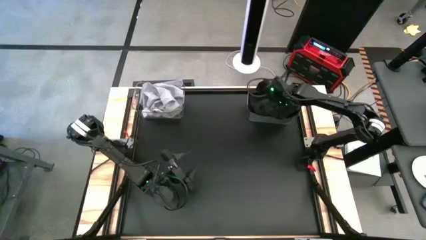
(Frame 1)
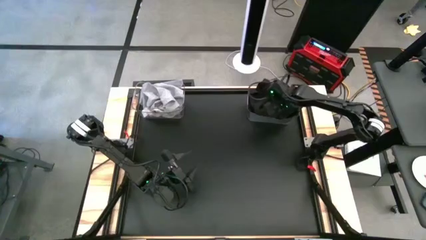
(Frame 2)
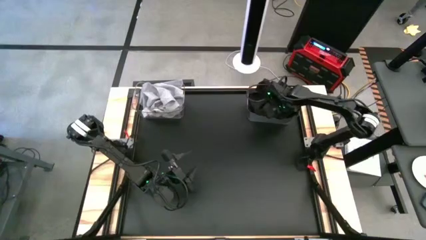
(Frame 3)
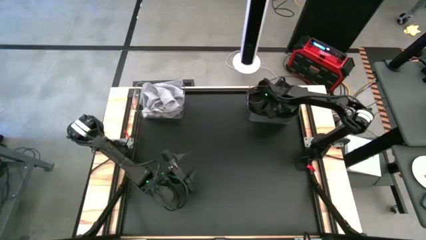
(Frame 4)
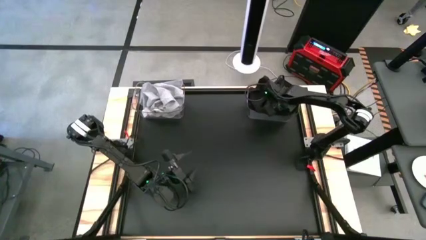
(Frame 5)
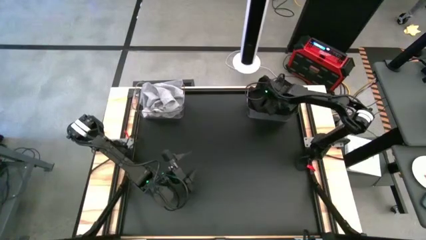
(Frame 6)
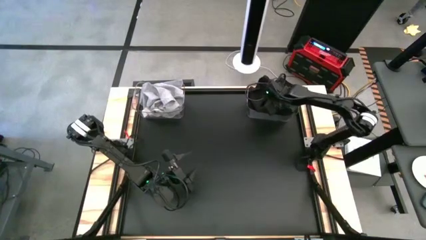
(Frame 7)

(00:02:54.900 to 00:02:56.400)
Task: Sort towels by color in basket
Adjust the black towel in the right transparent bin

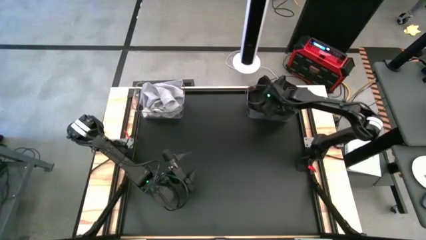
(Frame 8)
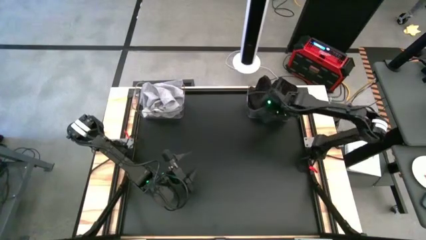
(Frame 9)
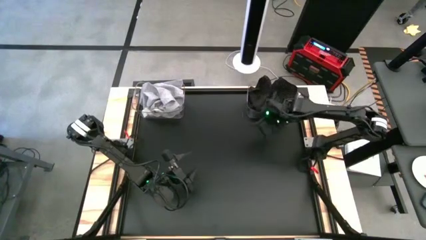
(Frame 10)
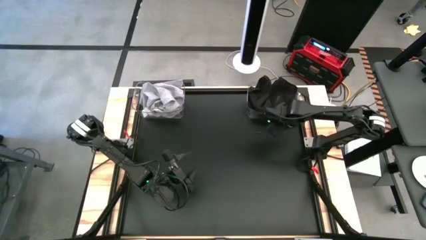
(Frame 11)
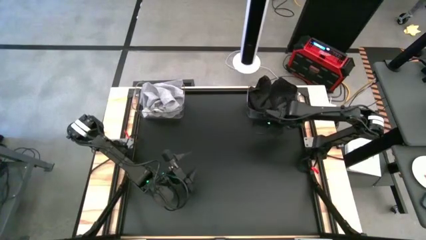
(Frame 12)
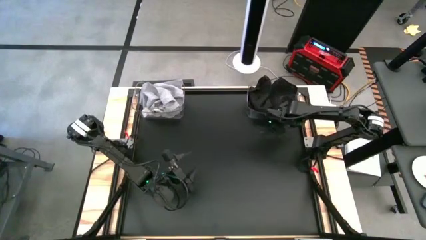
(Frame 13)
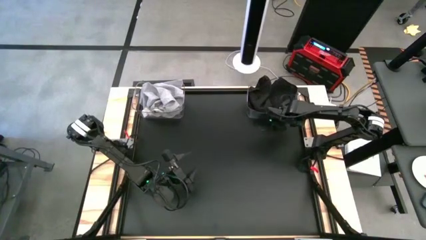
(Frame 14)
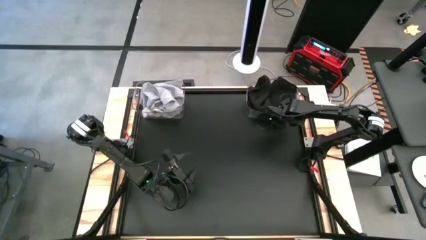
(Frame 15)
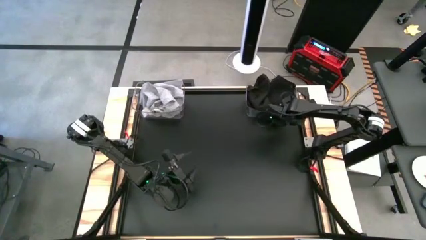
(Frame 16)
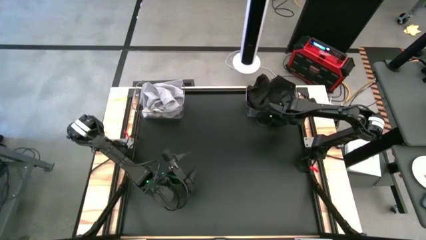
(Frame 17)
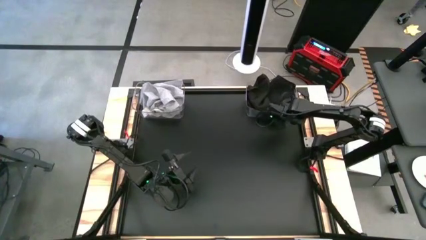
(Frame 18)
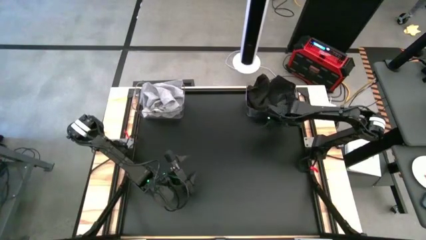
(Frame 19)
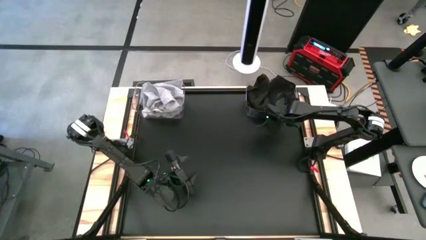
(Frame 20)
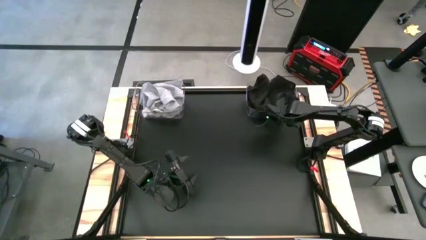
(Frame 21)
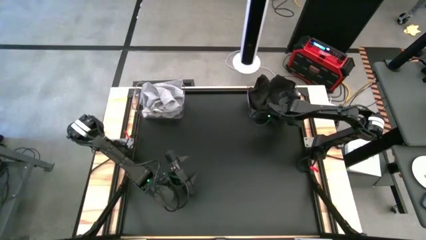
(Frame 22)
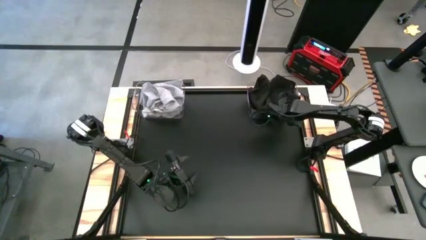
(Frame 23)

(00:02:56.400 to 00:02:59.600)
Adjust the right transparent bin

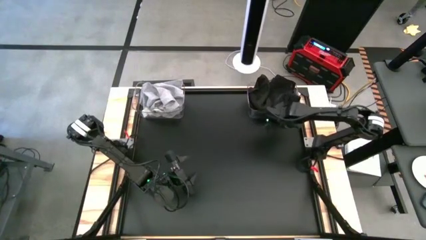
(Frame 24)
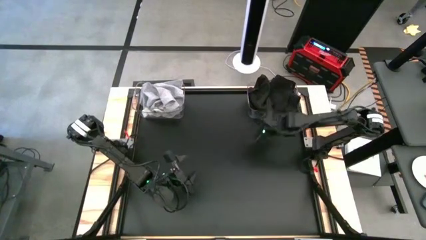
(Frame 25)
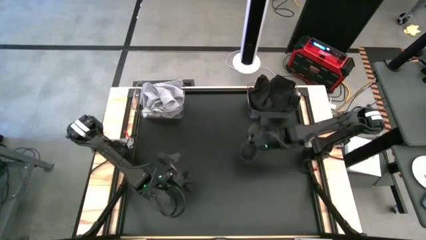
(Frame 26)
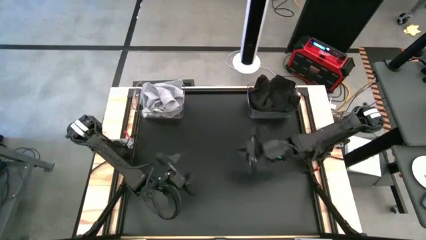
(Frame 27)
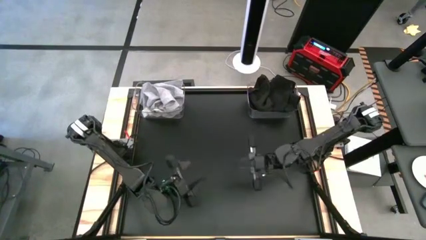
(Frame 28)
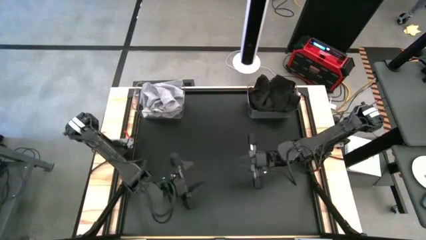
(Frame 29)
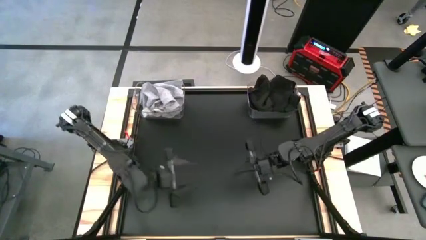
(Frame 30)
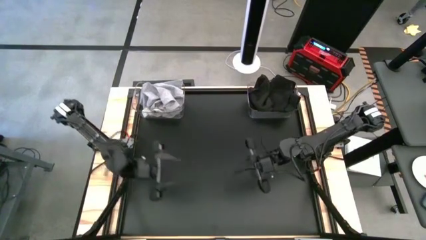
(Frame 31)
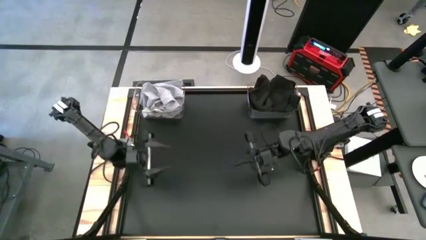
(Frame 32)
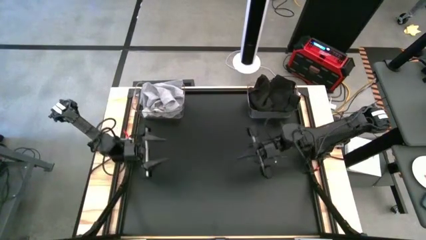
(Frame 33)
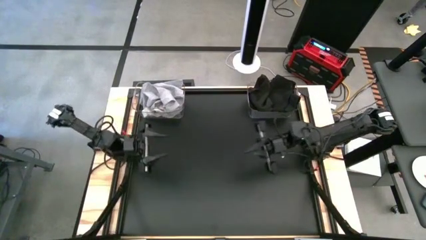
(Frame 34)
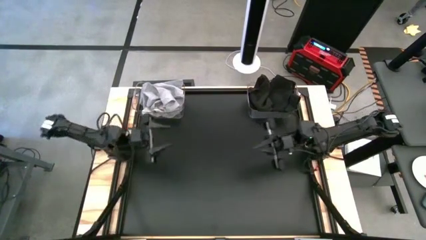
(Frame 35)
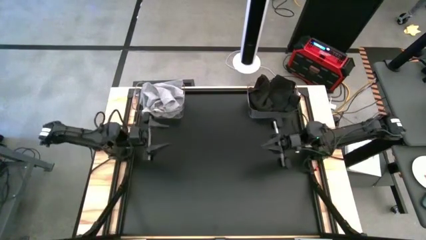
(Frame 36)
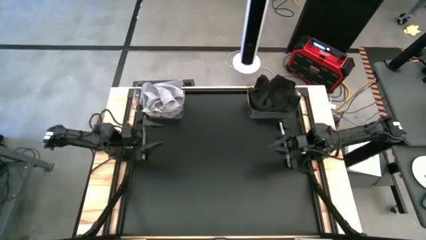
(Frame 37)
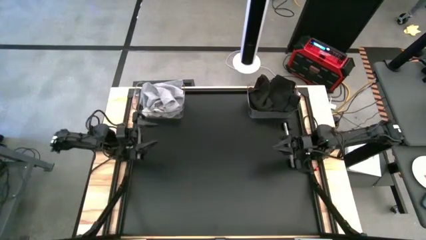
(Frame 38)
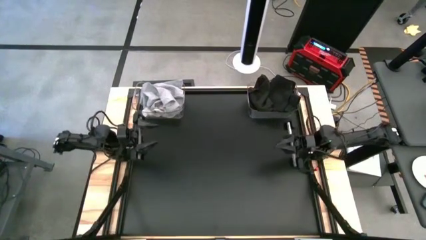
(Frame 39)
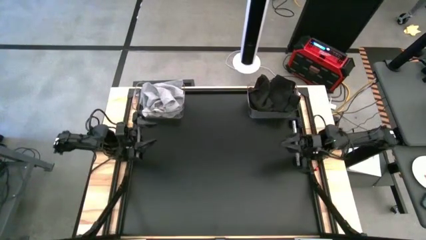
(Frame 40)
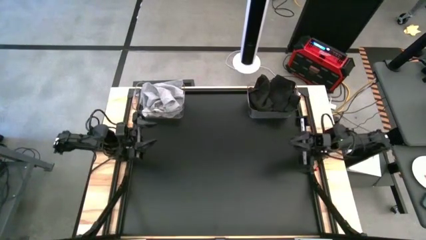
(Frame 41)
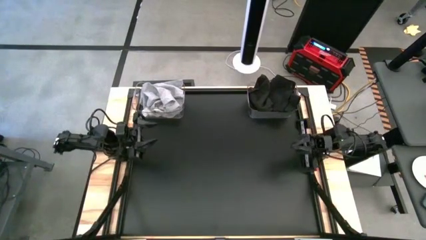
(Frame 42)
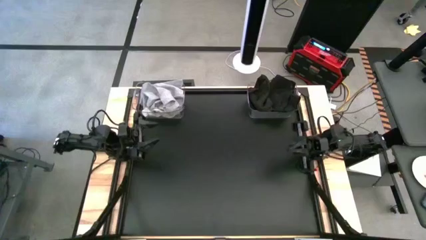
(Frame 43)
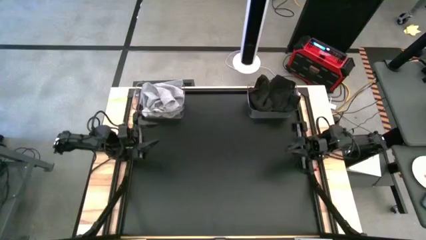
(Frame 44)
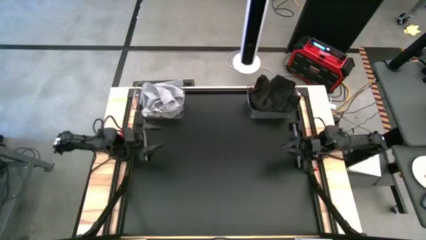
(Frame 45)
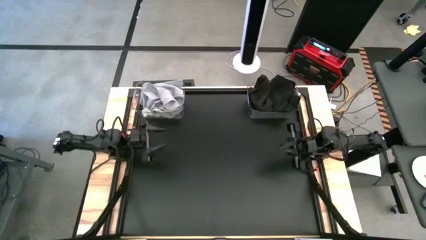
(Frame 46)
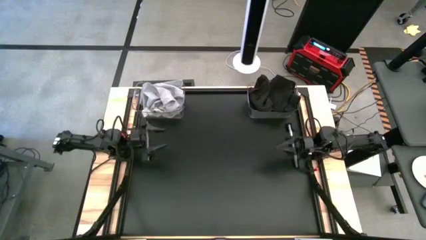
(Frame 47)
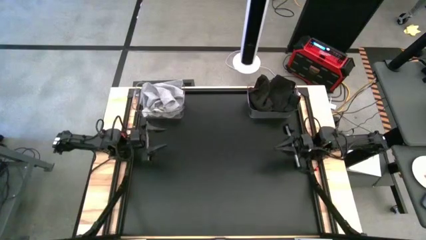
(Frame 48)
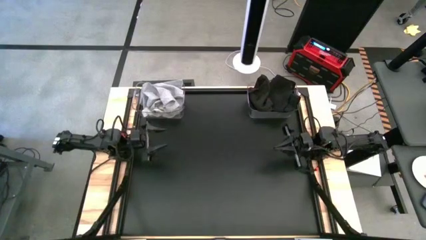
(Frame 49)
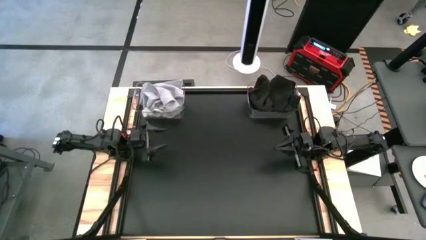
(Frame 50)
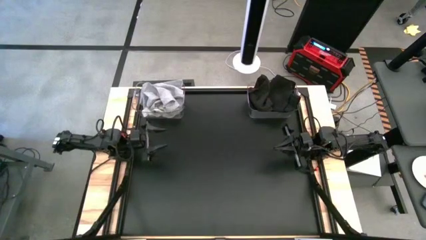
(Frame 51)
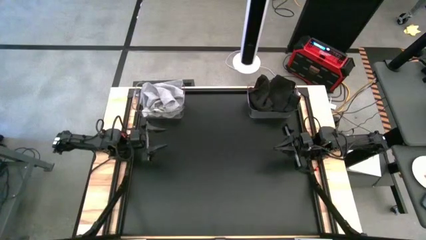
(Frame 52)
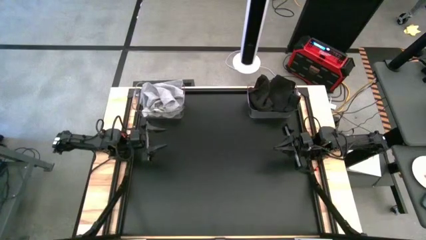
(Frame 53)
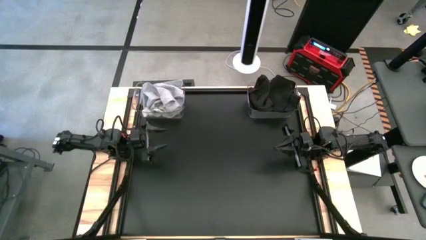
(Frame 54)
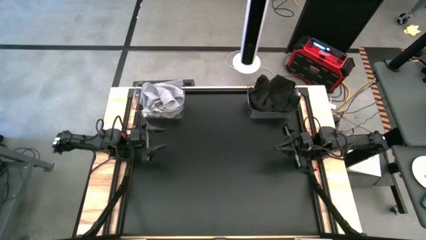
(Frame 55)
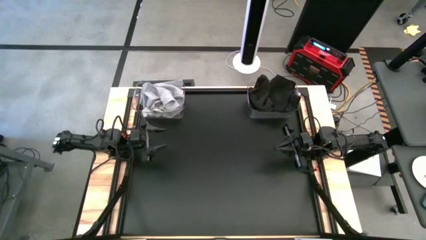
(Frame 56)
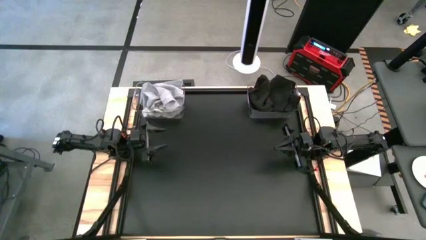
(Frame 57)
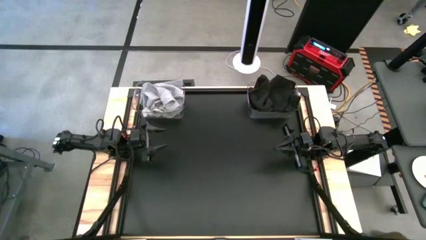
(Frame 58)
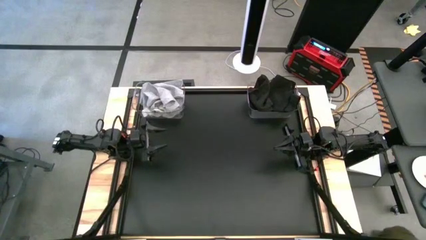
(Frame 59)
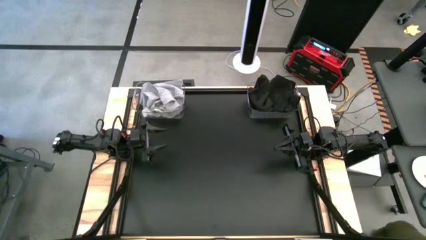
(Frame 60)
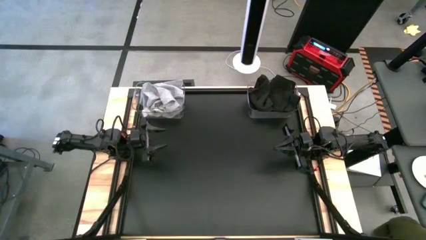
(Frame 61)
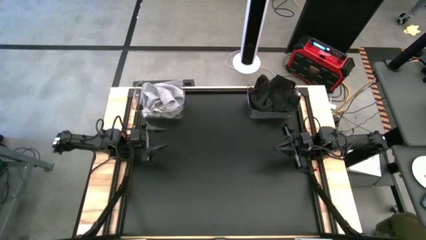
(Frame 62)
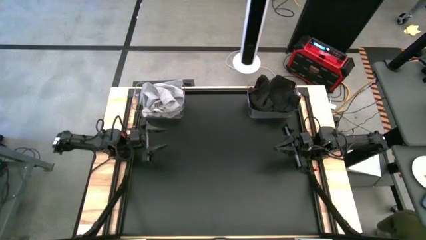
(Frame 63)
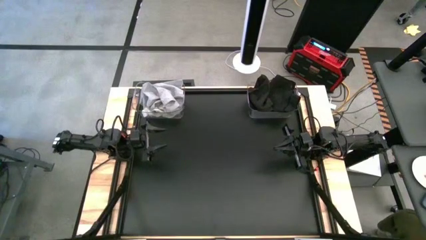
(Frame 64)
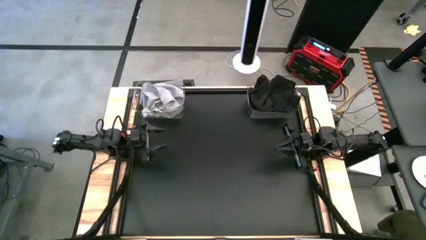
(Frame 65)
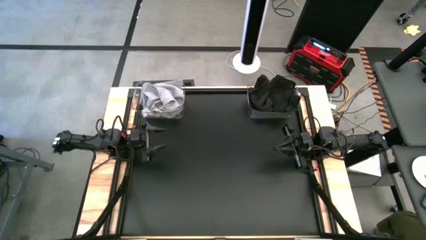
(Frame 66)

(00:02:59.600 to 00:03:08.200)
Return To Home Position

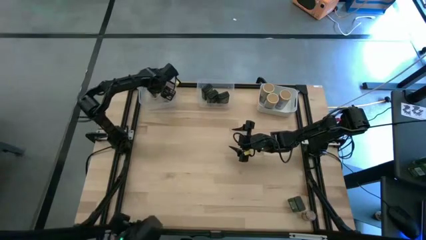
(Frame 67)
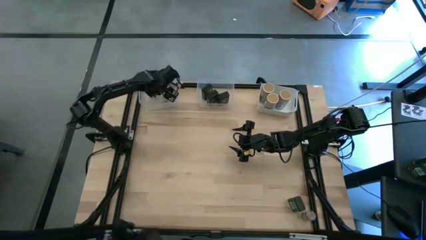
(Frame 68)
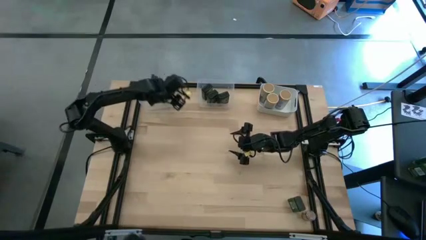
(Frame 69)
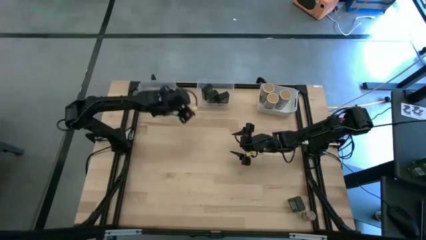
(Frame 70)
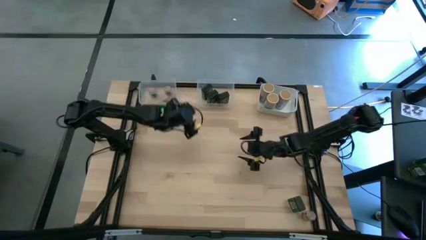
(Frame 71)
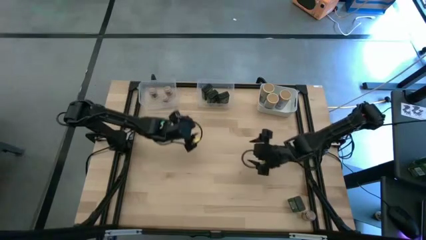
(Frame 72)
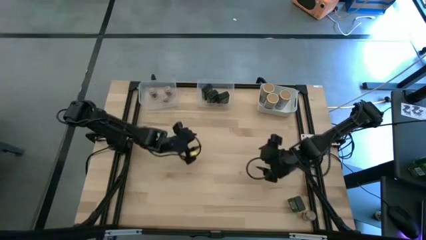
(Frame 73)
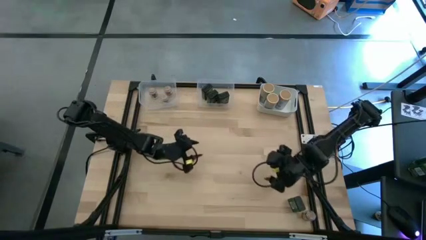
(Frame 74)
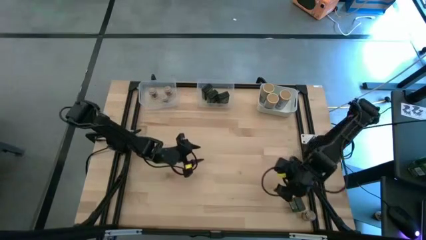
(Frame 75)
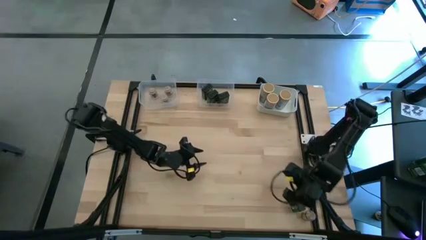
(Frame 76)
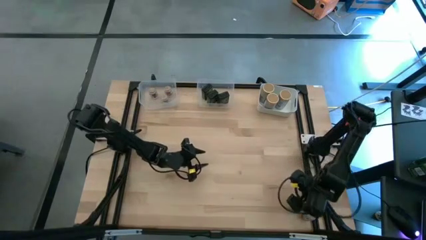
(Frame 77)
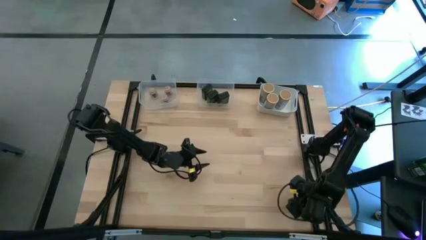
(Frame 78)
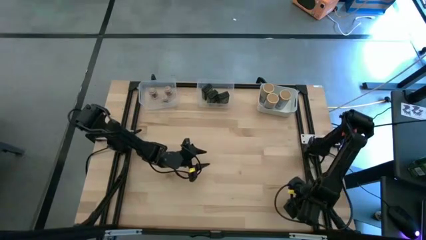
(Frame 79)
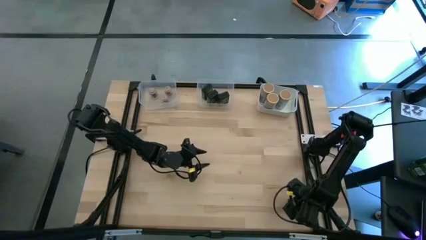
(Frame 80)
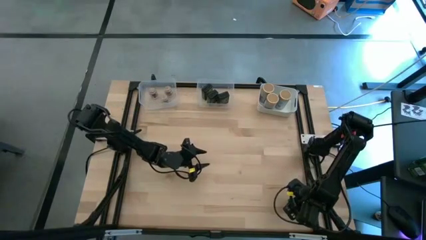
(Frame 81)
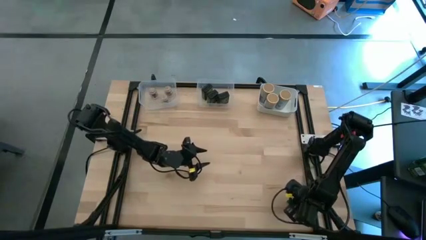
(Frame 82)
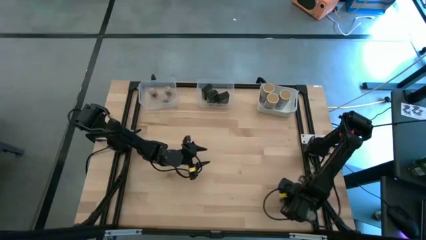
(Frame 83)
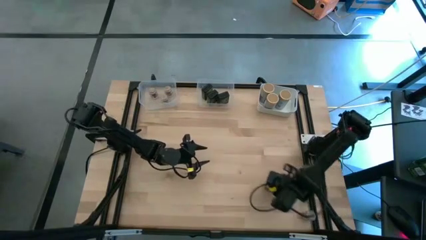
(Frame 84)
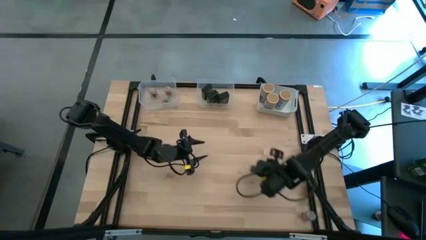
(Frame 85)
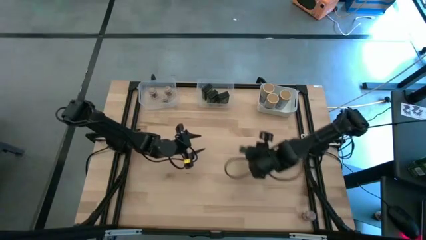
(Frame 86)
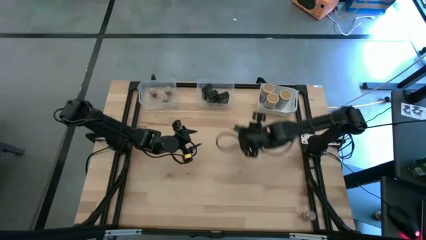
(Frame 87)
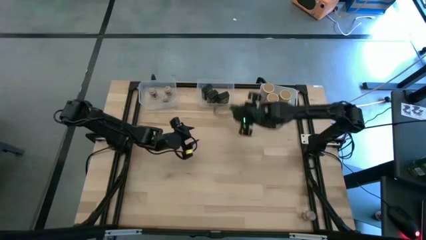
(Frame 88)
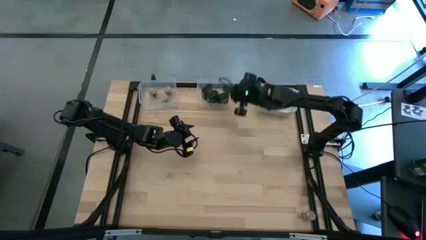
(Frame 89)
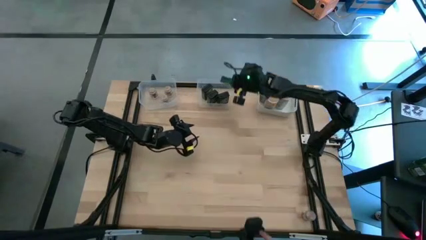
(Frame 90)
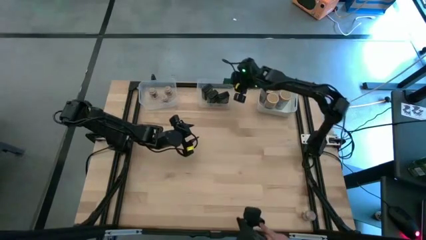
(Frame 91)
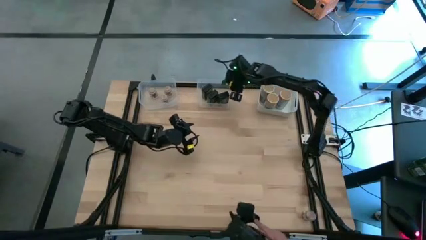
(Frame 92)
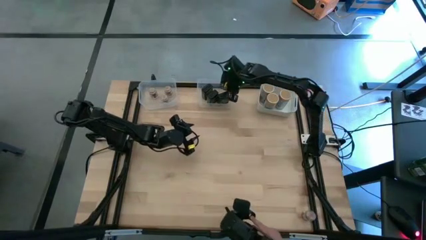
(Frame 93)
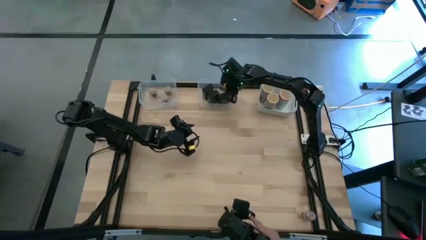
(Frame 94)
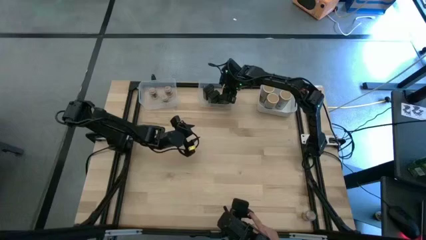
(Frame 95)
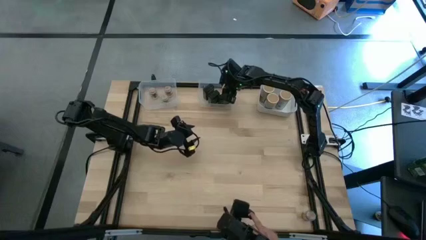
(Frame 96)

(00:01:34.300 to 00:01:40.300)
Task: Sort spices by type
Put the black seasoning can into the middle transparent bin
